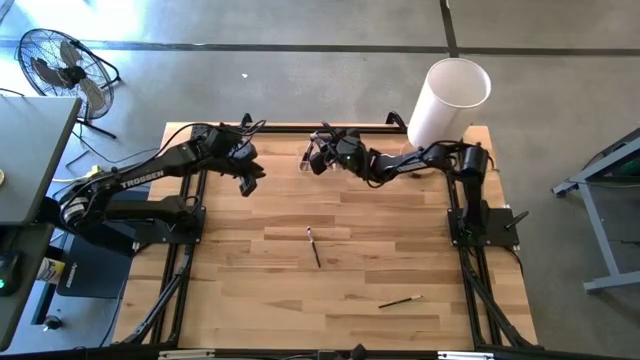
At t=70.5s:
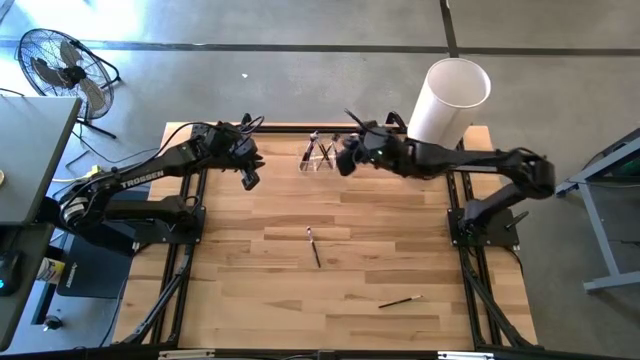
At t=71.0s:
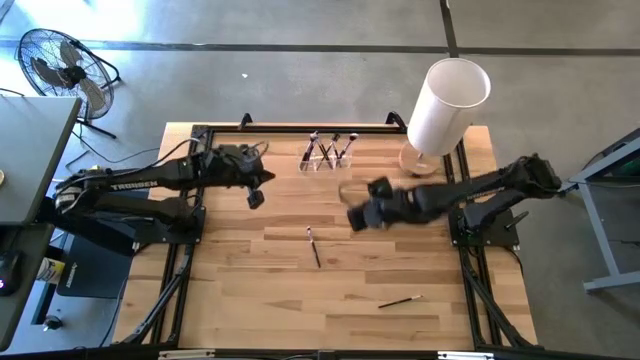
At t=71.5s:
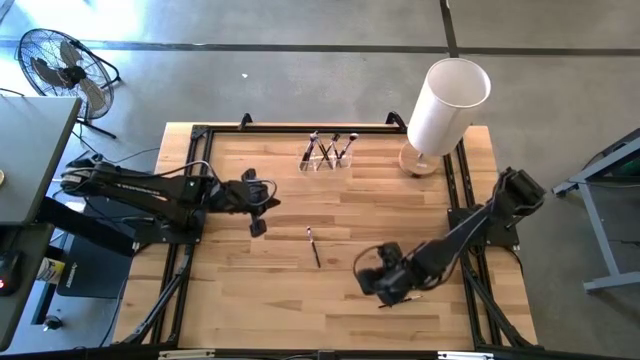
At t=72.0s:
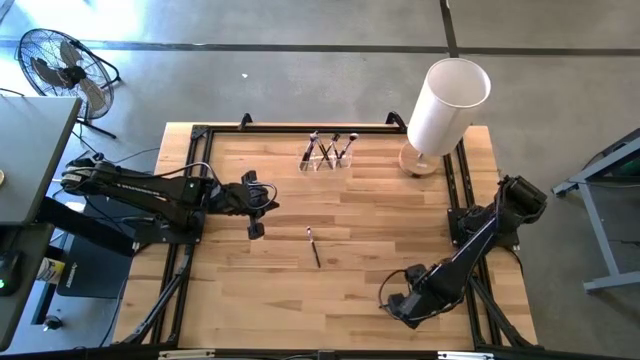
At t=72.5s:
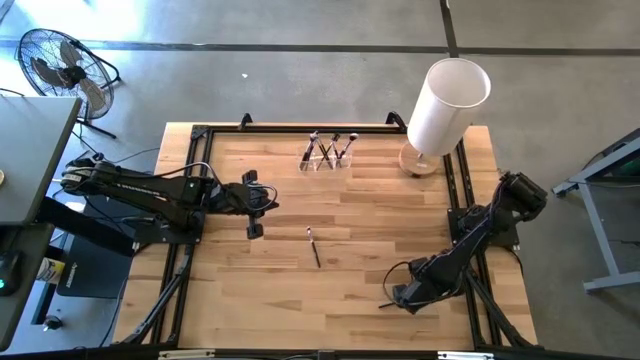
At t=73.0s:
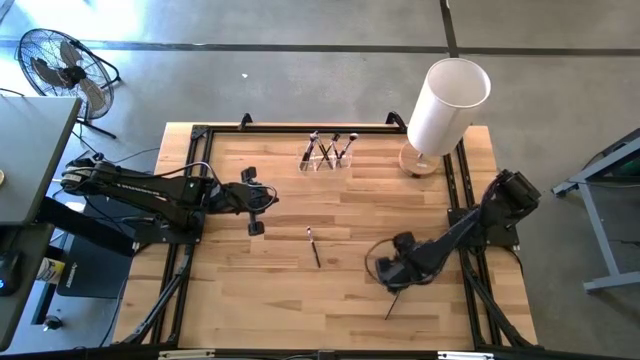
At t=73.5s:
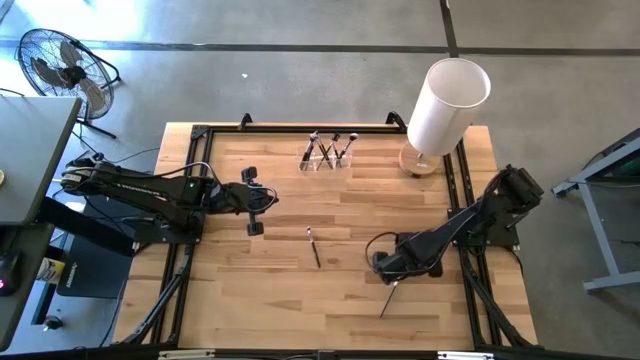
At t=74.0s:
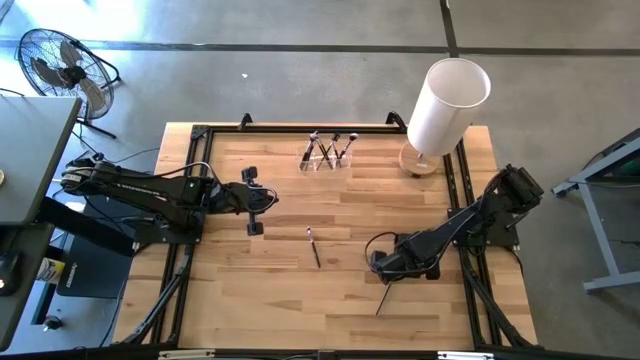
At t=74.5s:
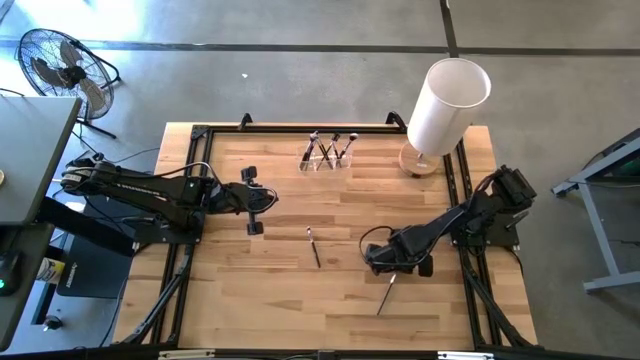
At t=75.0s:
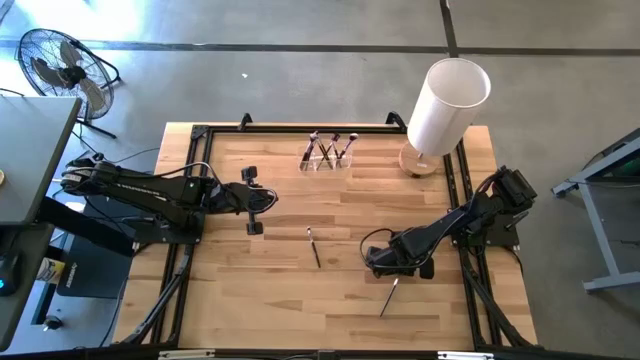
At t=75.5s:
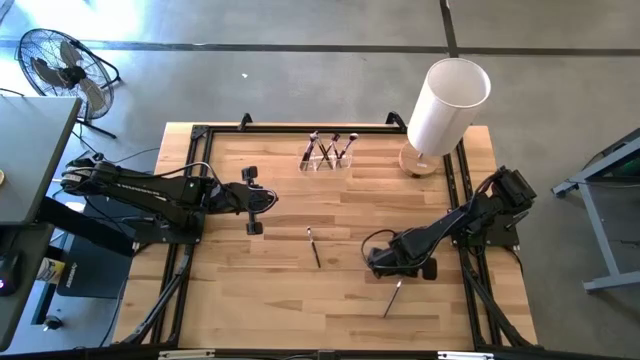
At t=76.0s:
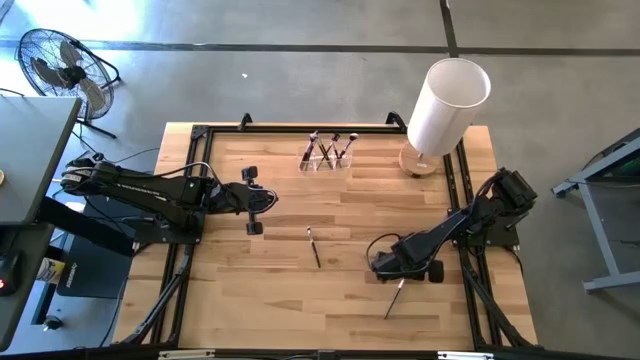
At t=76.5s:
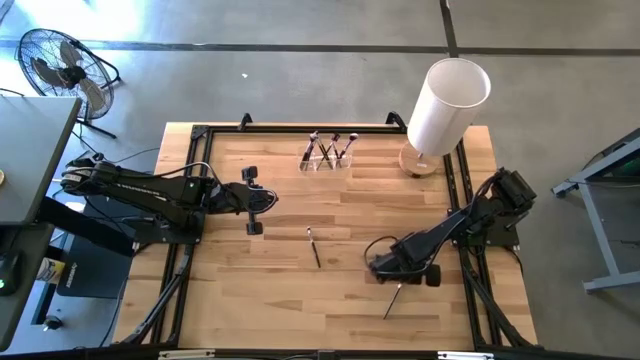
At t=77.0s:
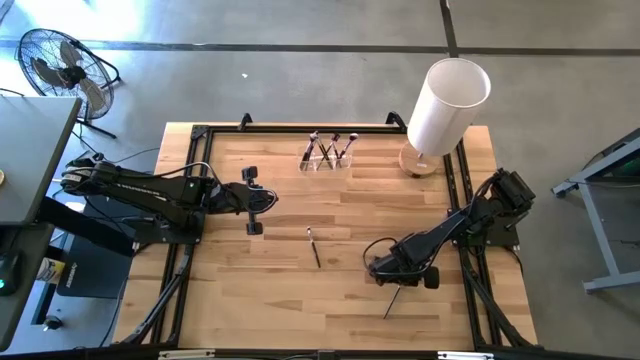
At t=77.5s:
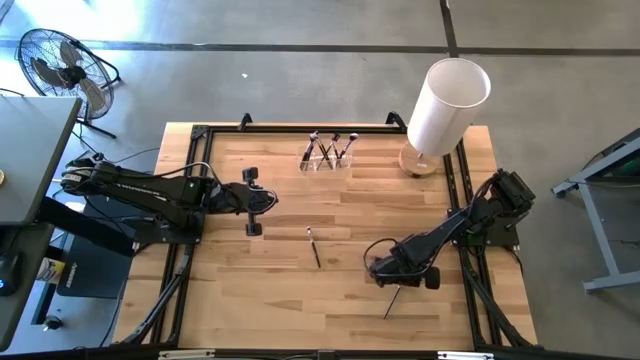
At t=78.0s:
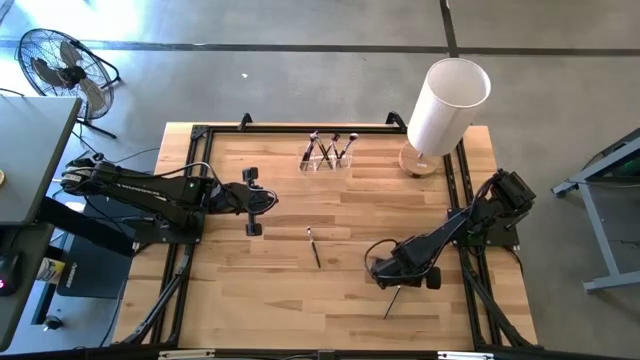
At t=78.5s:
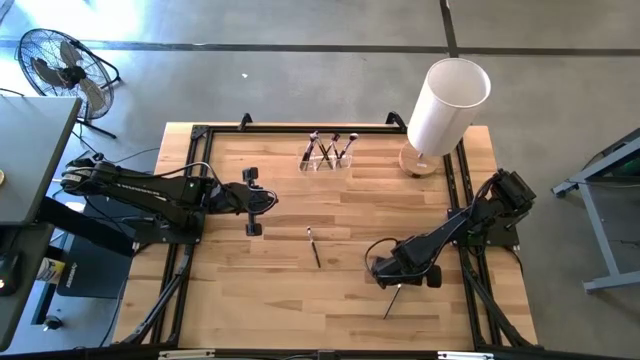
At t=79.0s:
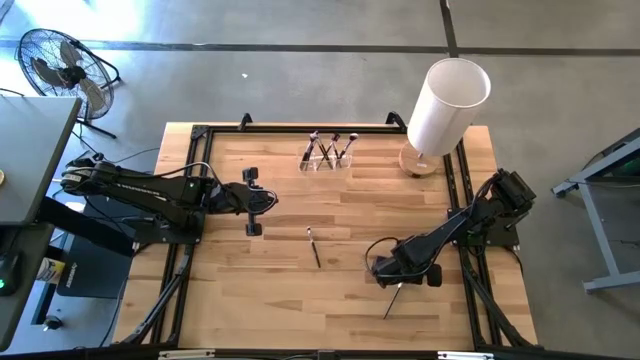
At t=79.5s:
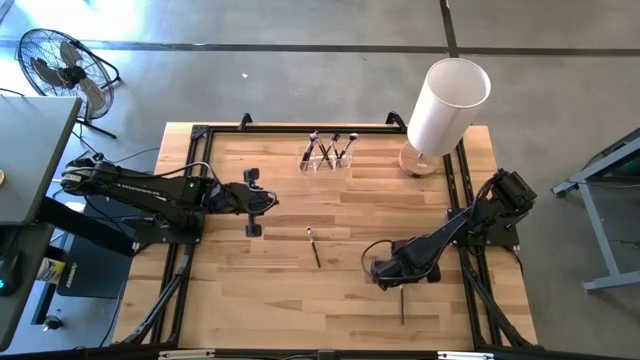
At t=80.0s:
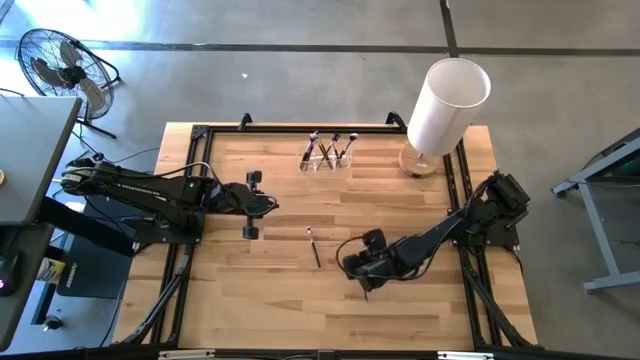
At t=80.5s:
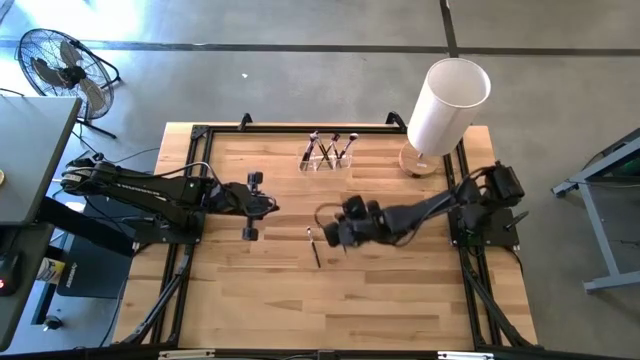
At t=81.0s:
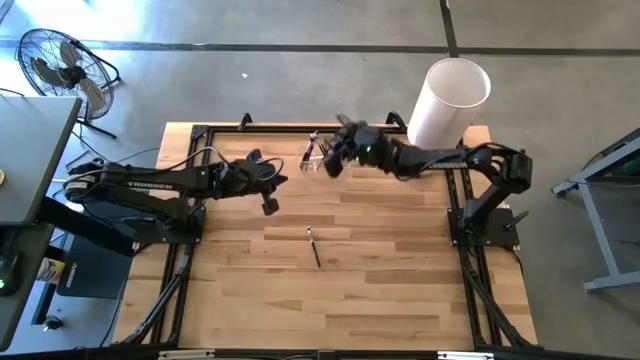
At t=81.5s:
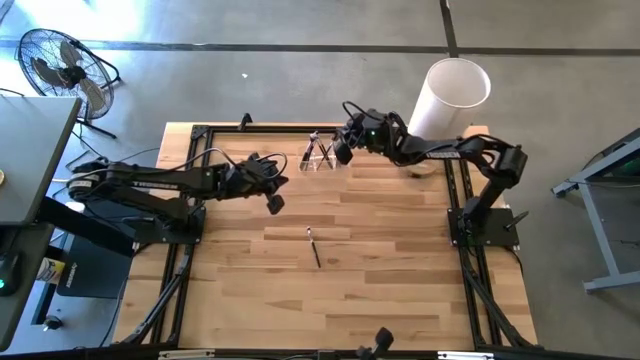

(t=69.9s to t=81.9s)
Task: Pick & Place Makeup Brushes
Put the black eyeshadow brush into the transparent organizer

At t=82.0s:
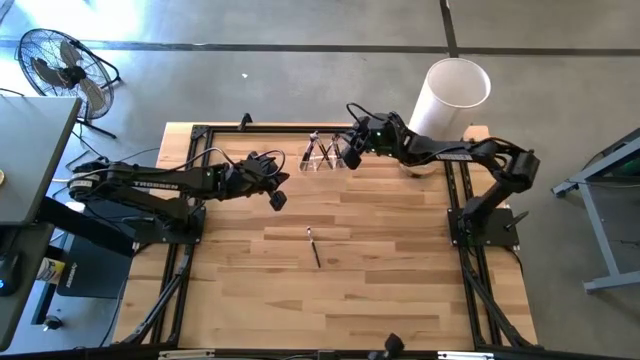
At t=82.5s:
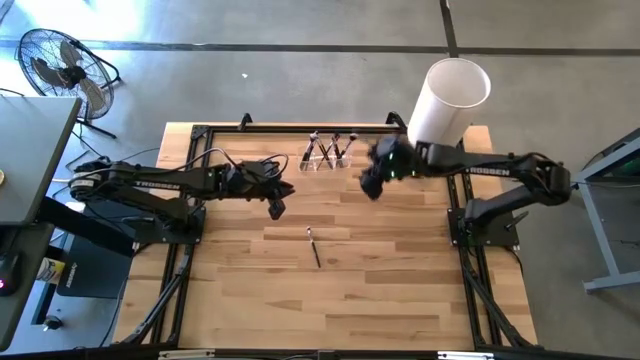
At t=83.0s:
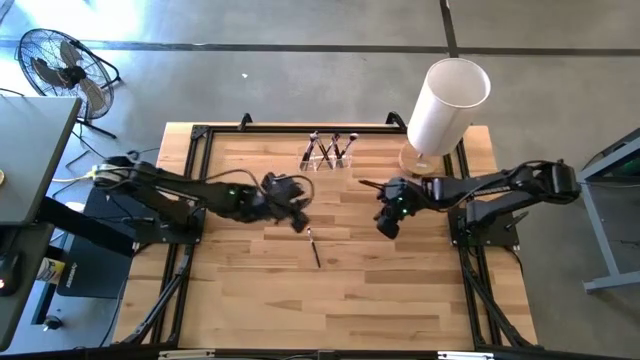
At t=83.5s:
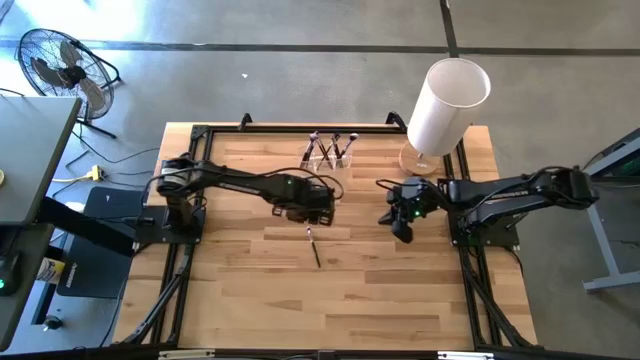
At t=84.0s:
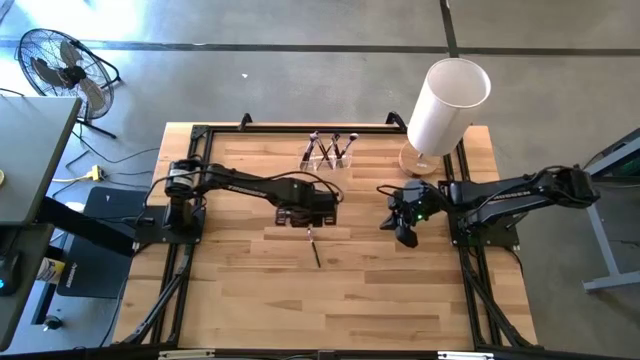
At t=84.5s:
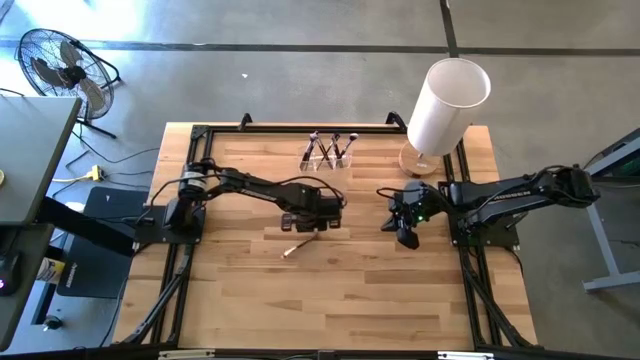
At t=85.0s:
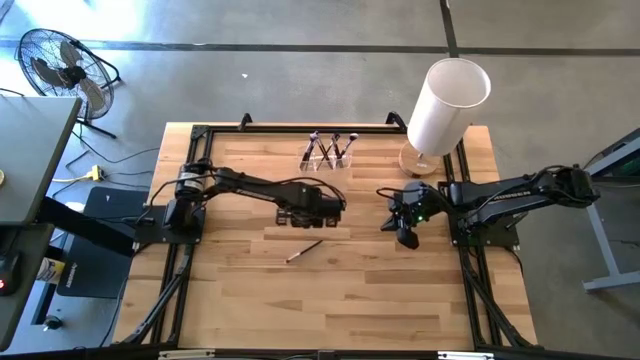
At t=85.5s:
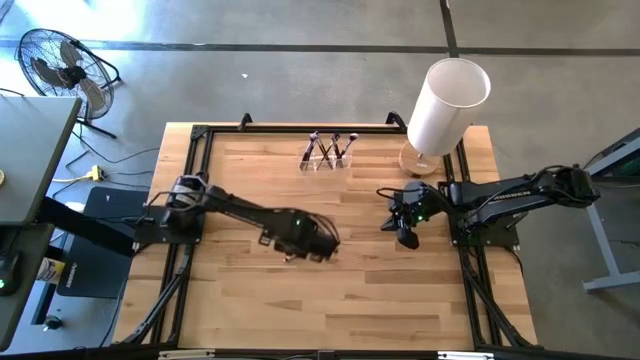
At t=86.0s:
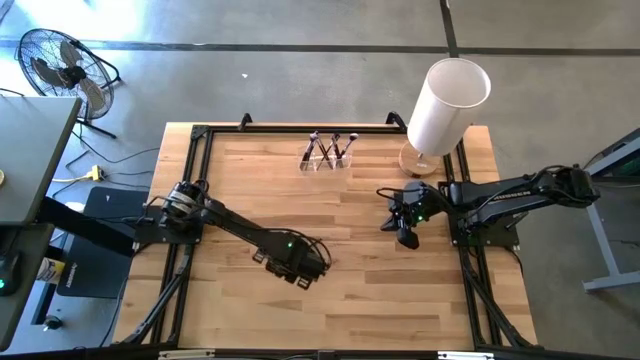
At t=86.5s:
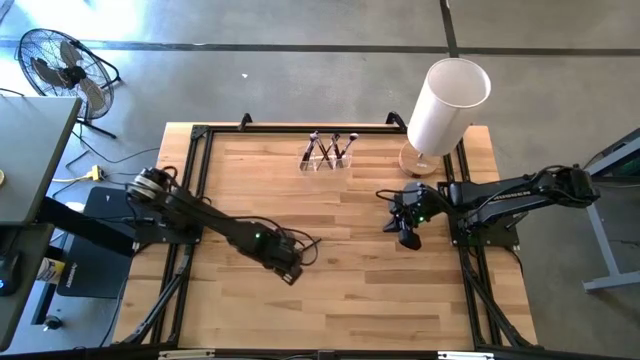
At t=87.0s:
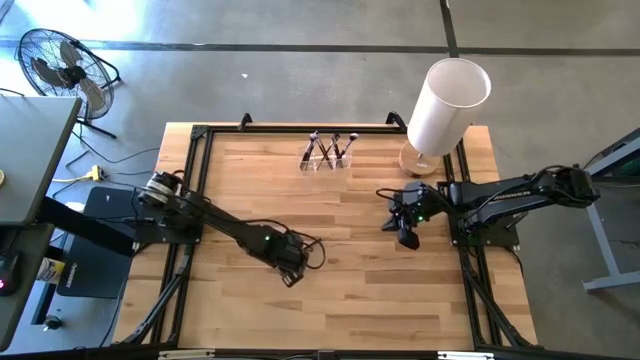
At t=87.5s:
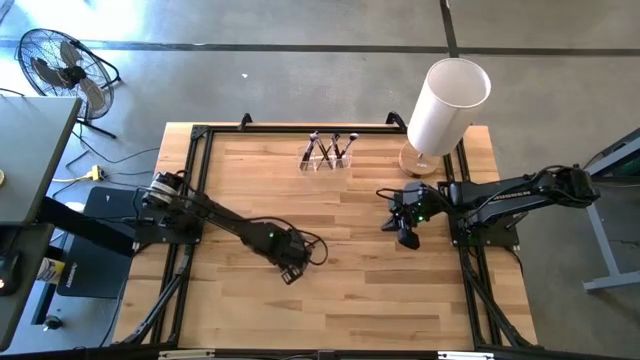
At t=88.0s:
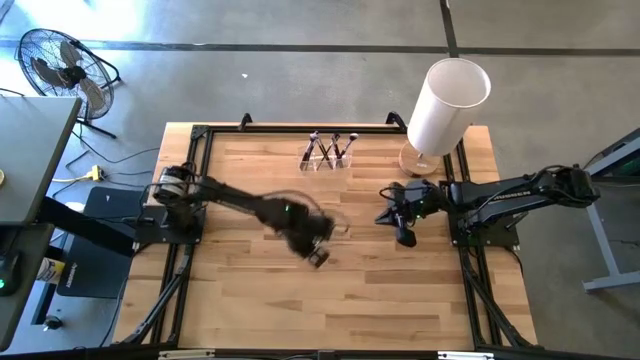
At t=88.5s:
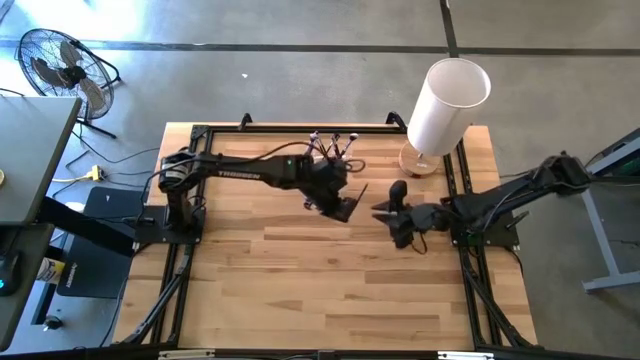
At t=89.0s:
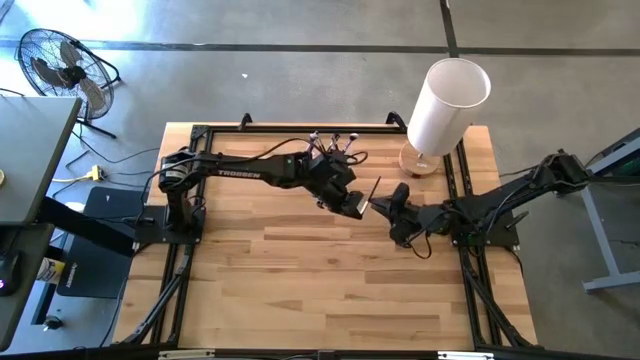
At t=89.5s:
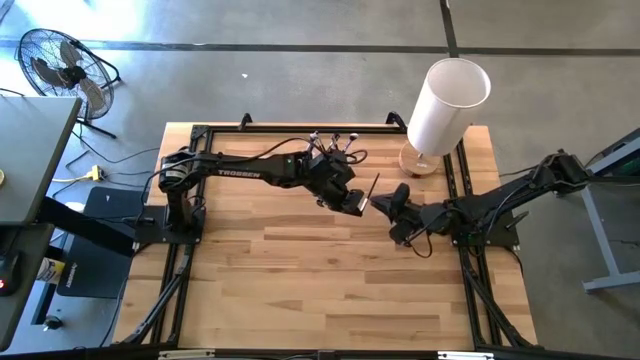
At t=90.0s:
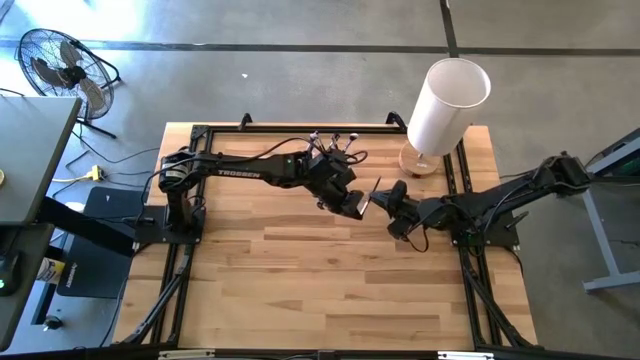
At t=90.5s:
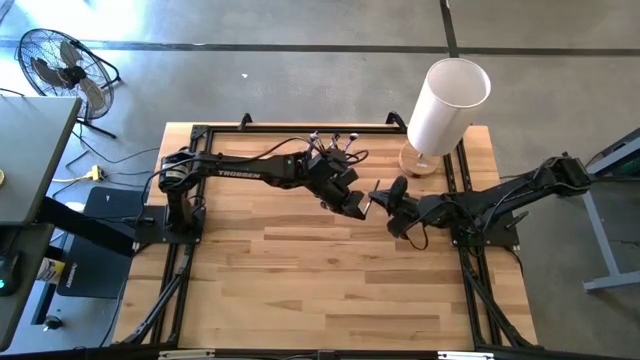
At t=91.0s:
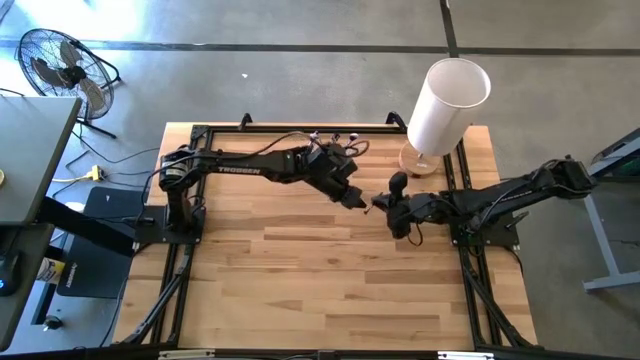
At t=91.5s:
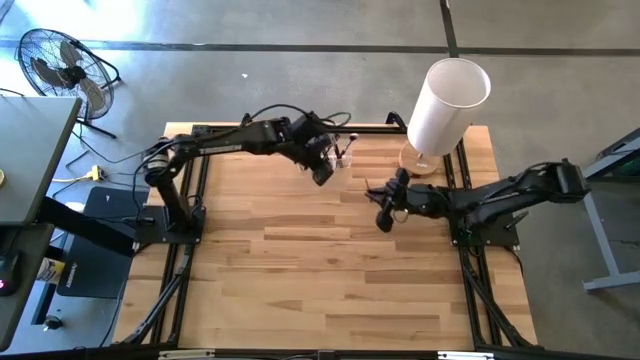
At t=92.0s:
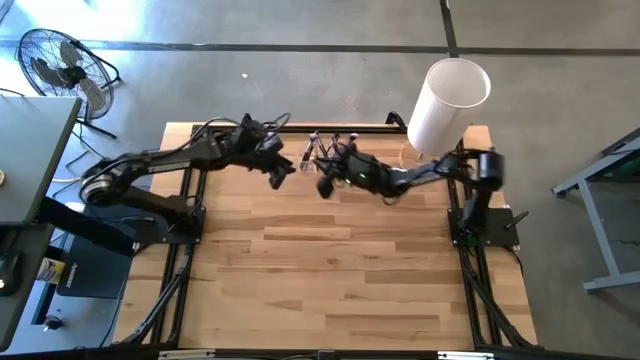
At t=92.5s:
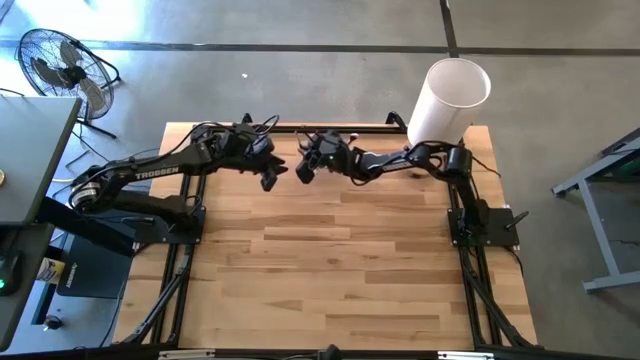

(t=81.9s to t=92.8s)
Put the black eyeshadow brush into the transparent organizer
